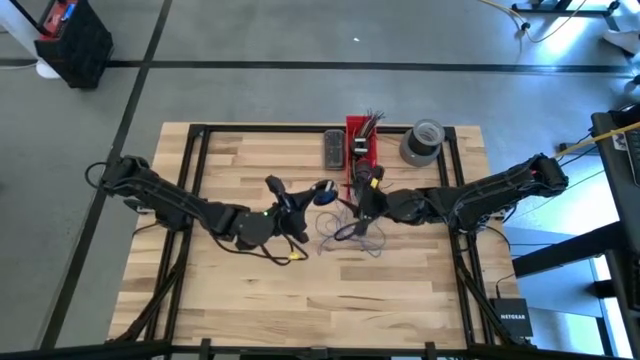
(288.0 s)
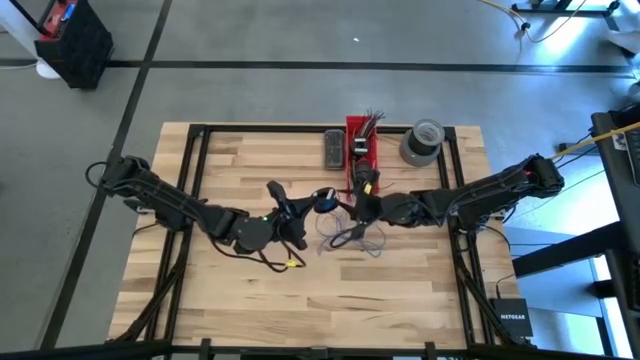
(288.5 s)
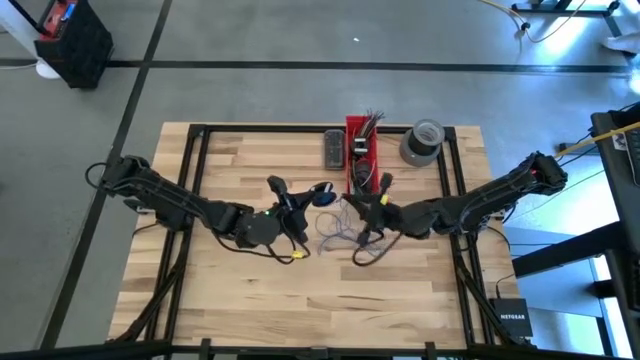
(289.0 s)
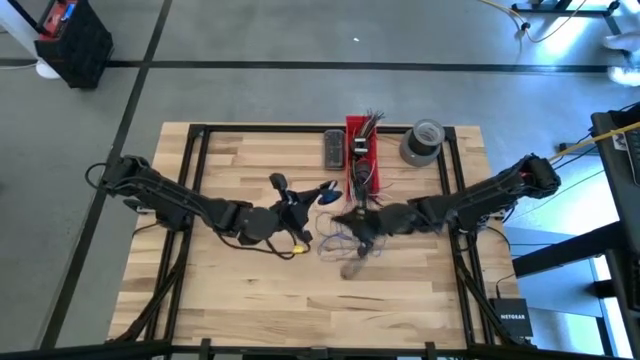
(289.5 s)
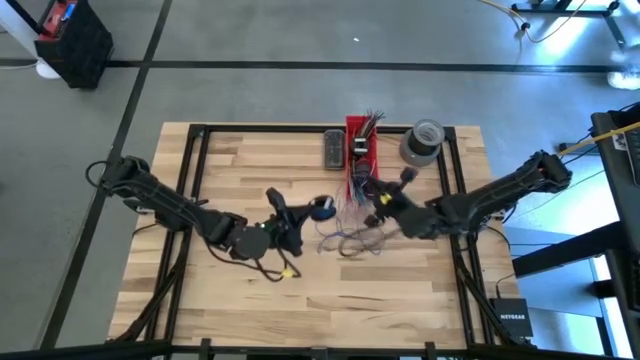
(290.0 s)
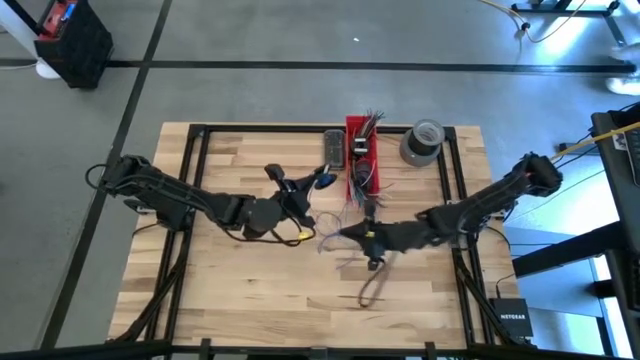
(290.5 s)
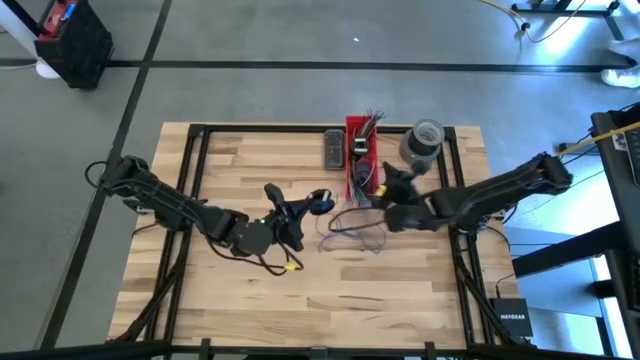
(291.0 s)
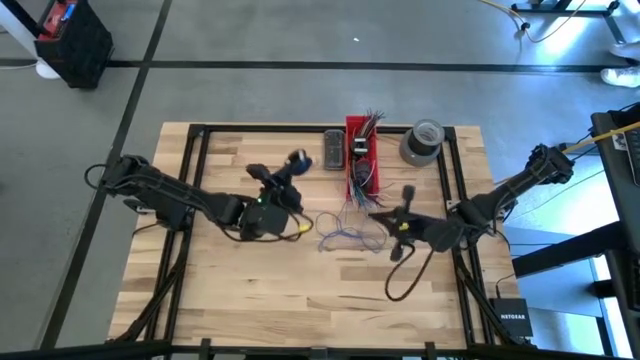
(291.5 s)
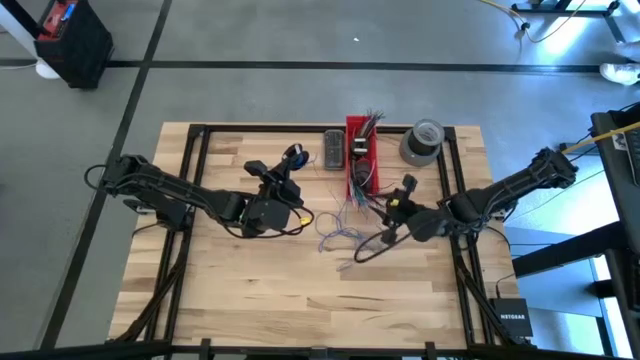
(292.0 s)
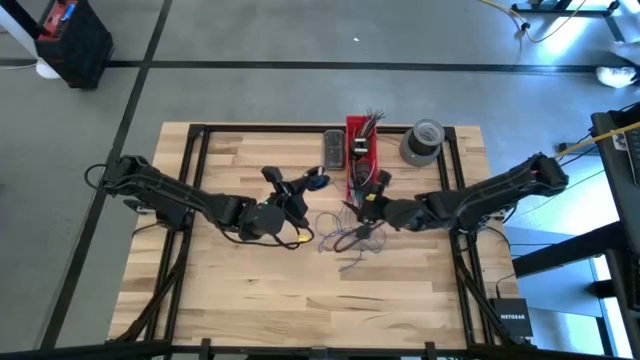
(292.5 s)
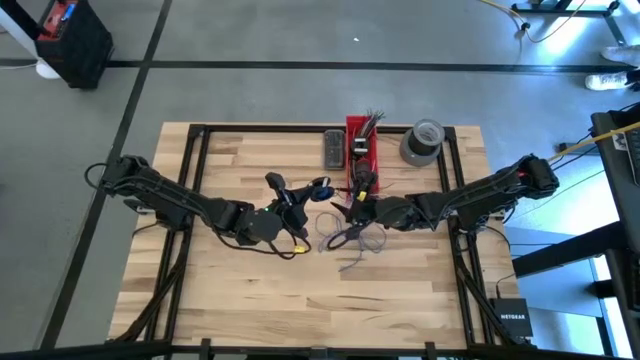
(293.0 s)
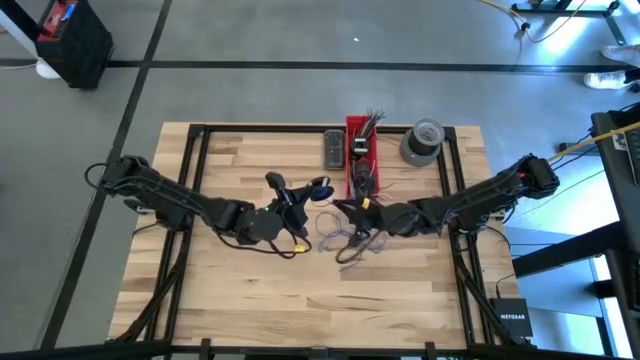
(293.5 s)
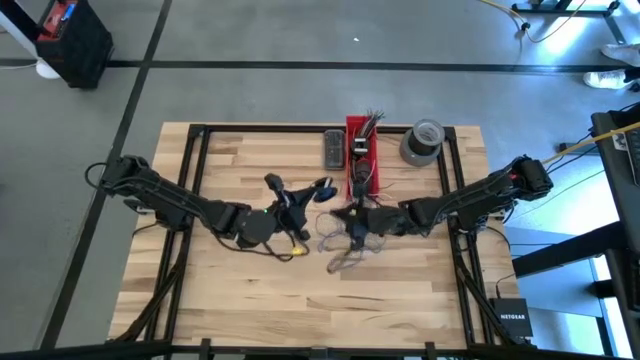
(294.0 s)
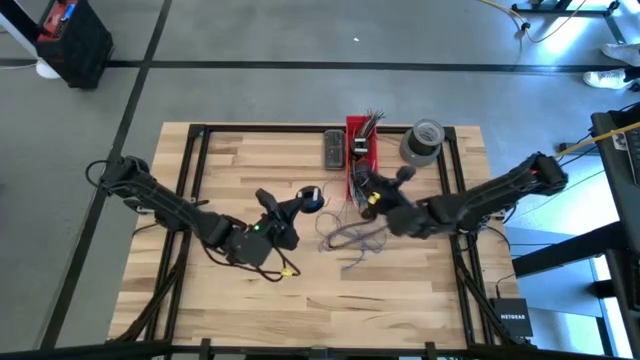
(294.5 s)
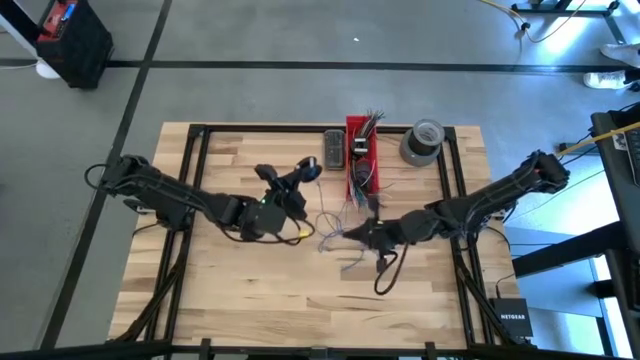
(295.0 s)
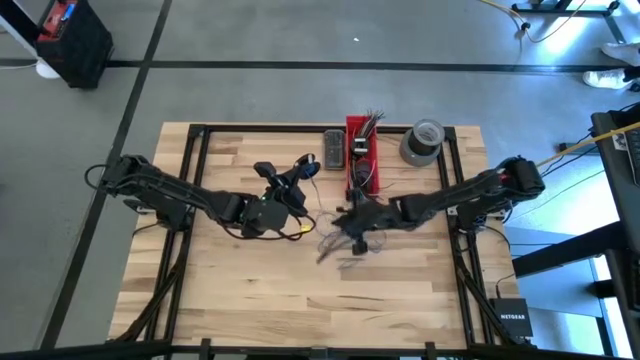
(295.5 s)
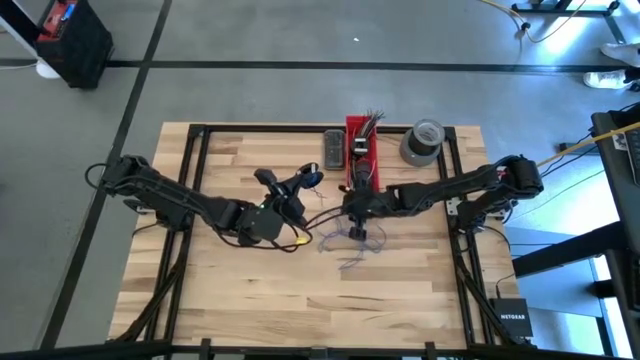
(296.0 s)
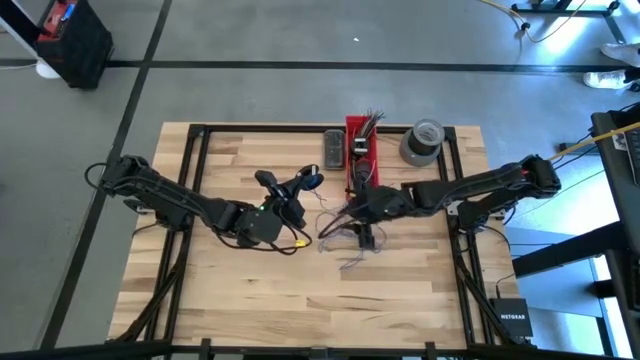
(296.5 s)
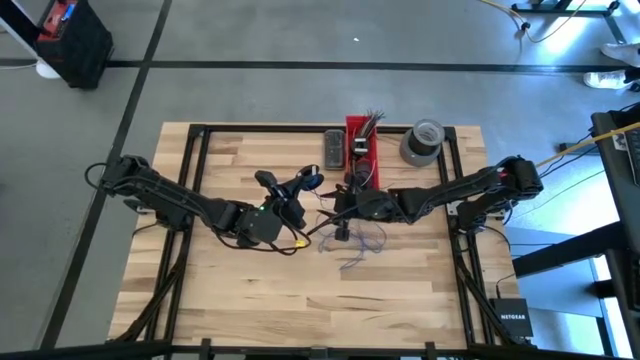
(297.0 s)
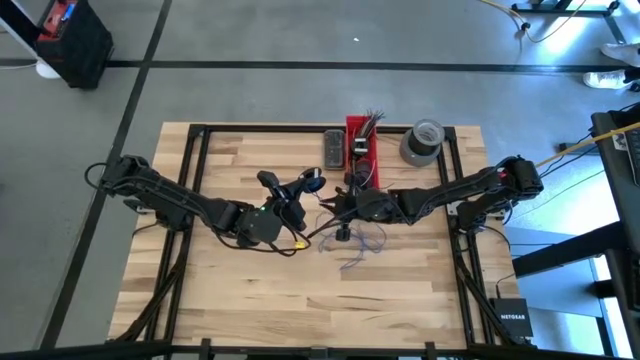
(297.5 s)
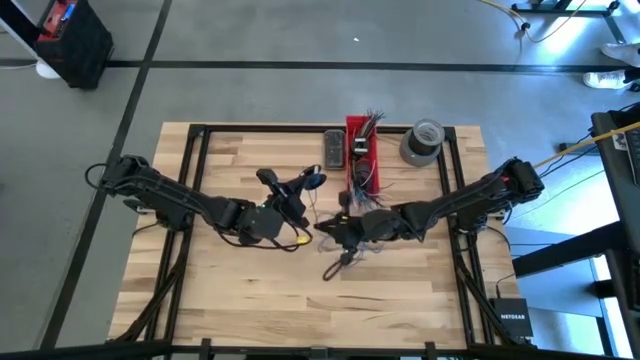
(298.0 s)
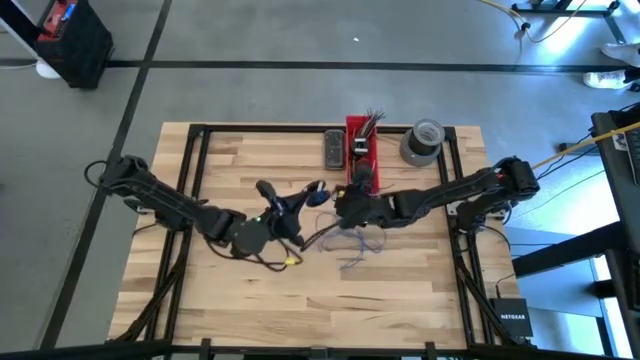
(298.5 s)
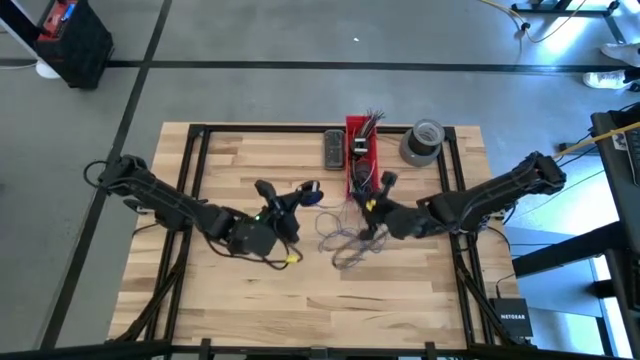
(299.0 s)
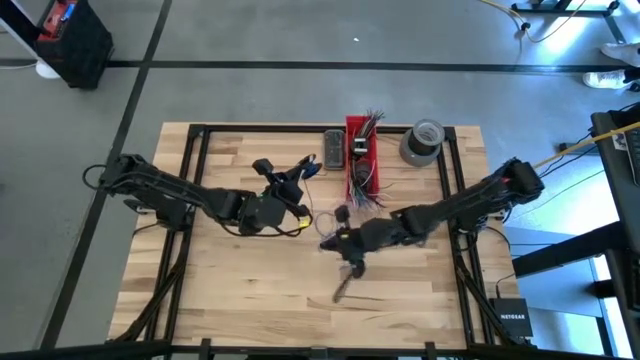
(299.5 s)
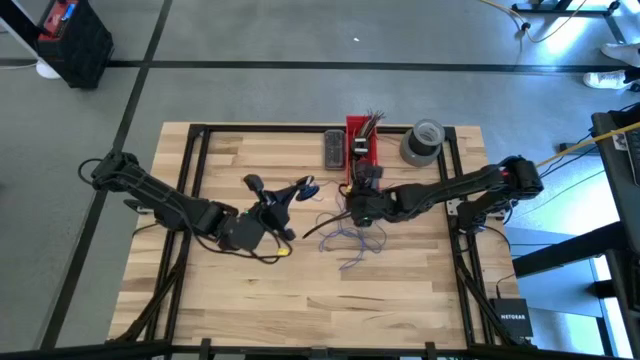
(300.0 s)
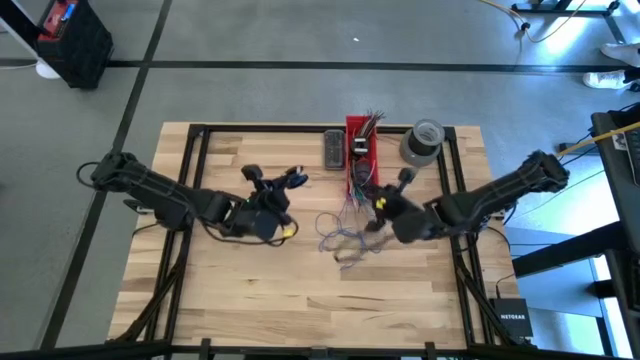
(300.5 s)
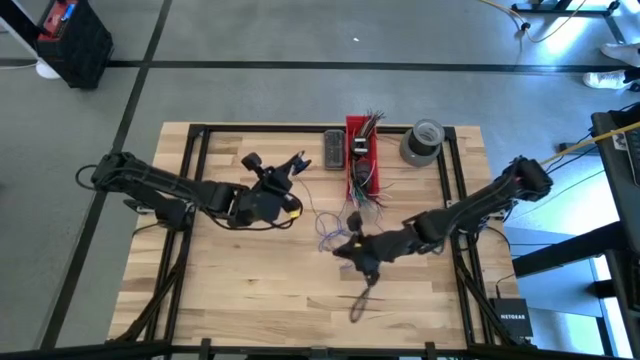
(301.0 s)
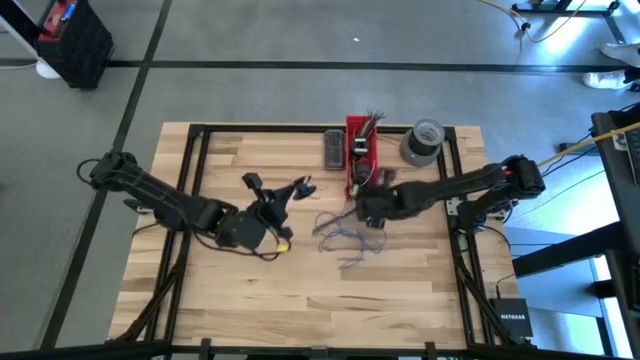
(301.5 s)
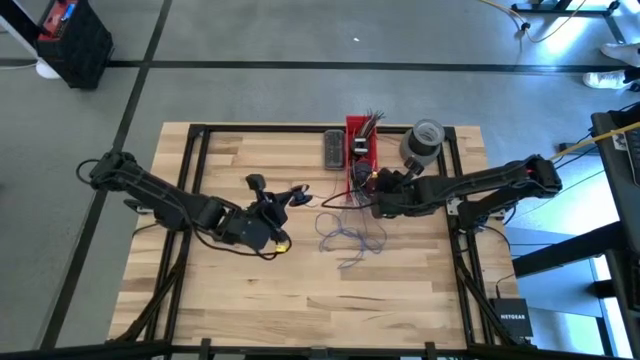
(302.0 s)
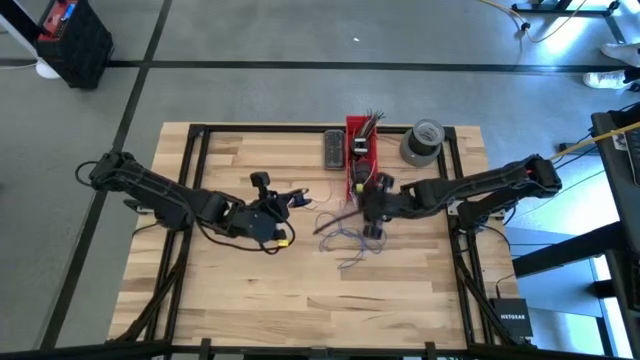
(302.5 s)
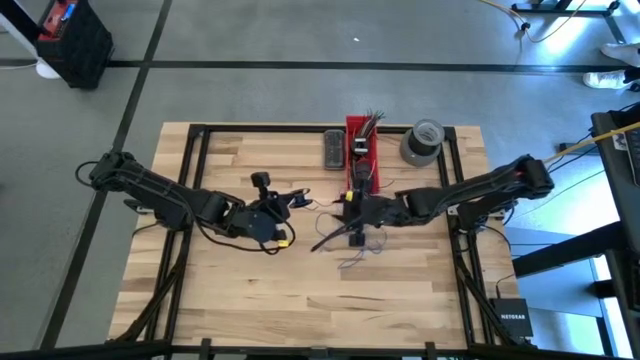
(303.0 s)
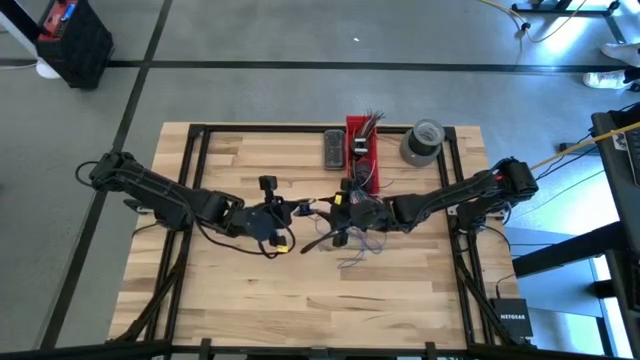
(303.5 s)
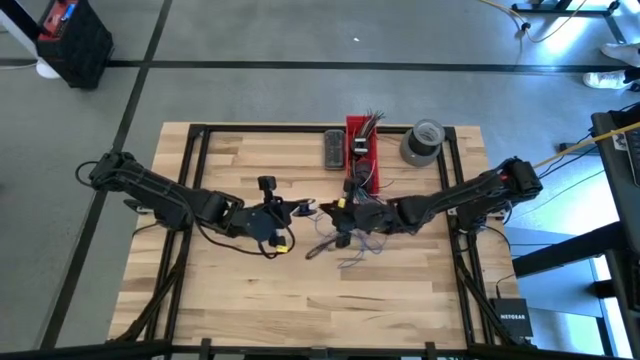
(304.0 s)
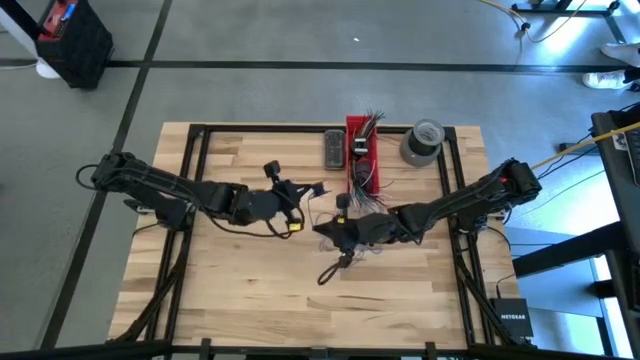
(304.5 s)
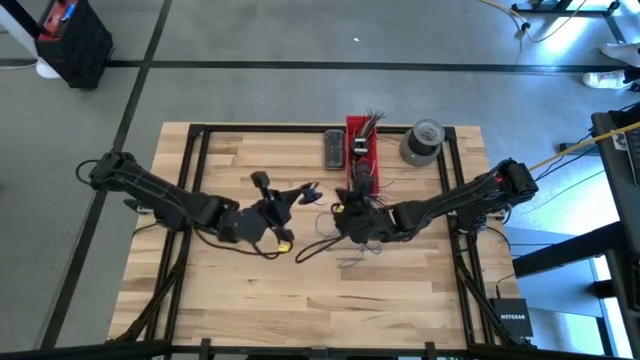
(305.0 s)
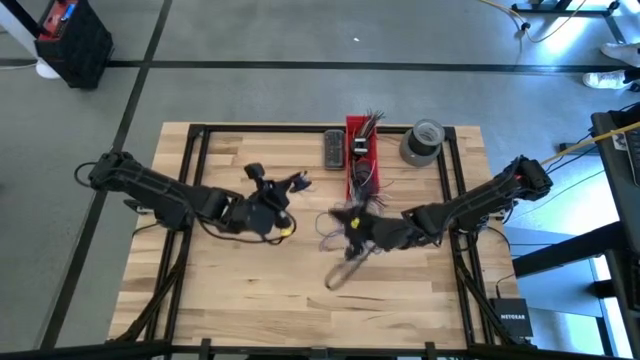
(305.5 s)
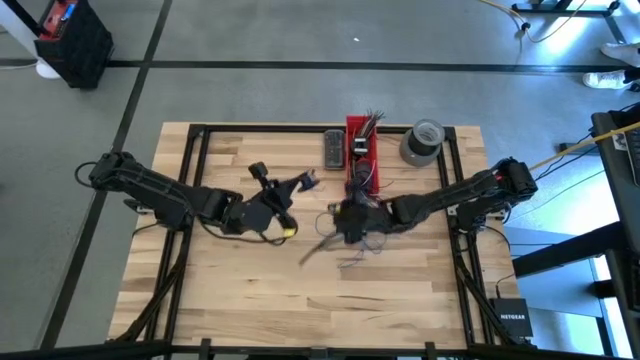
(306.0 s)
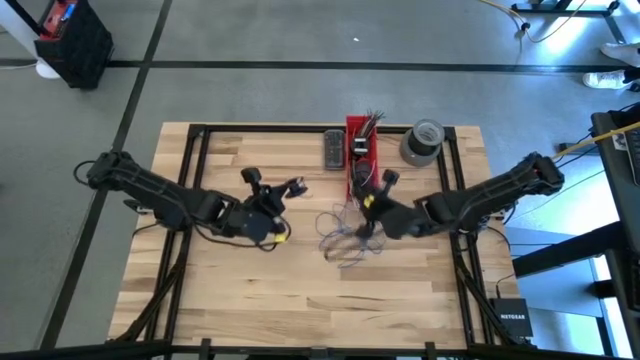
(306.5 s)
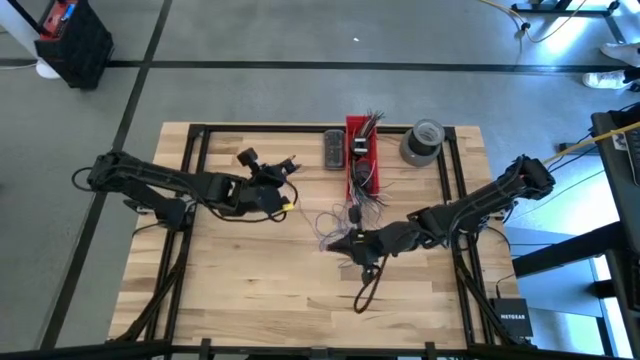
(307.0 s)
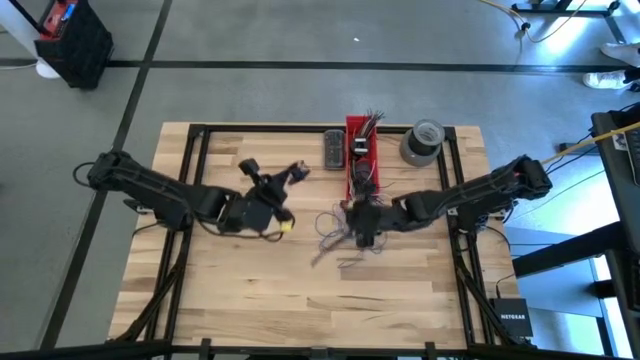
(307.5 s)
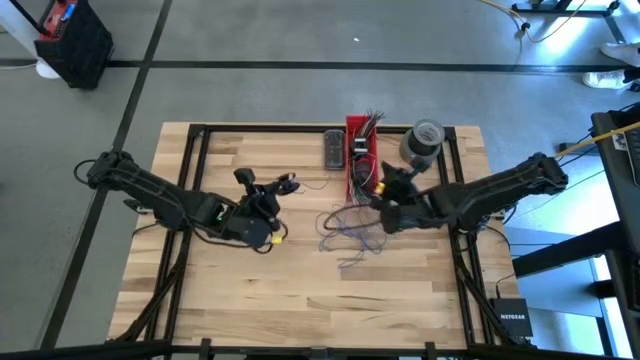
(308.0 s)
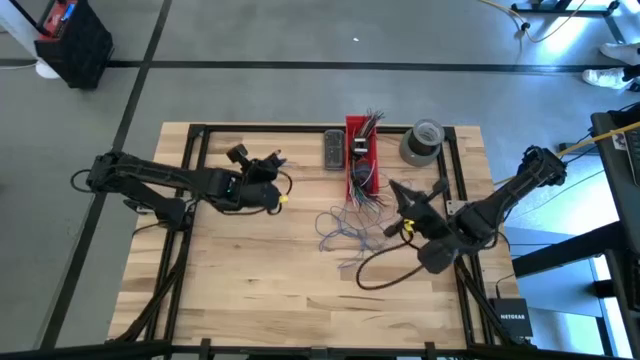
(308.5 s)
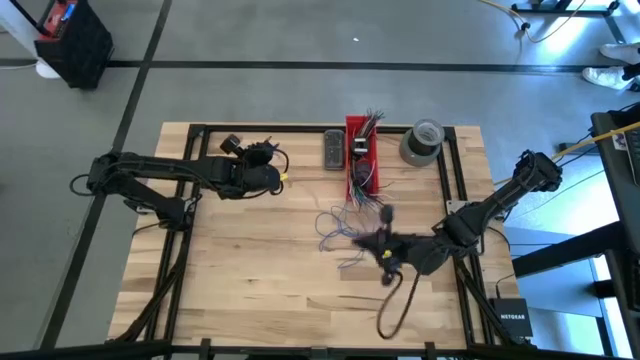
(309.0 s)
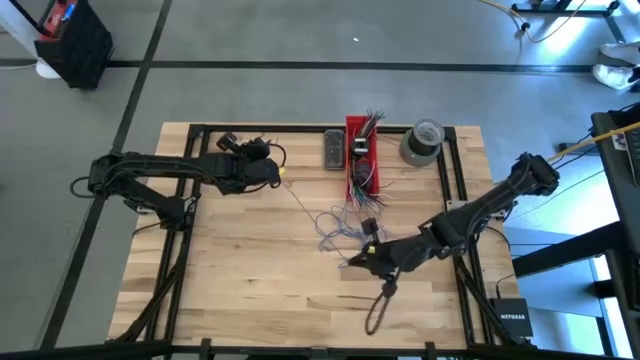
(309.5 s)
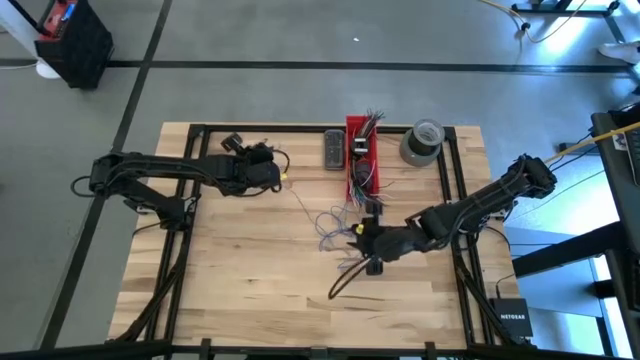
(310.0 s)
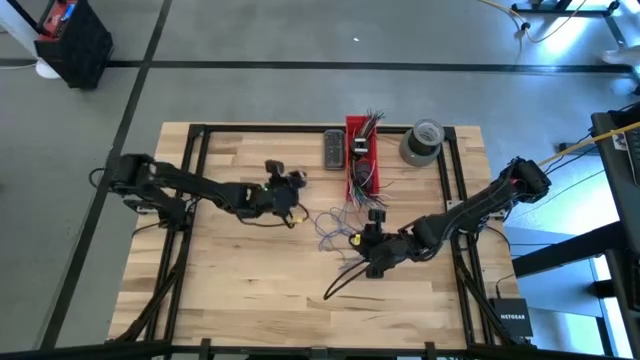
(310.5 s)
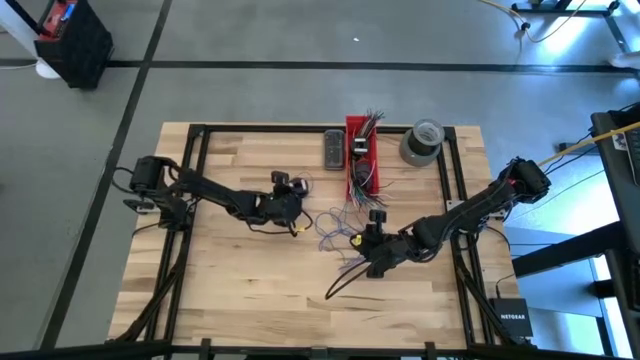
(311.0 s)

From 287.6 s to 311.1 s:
Task: Coil cords
Uncoil the blue wire from the black spool
